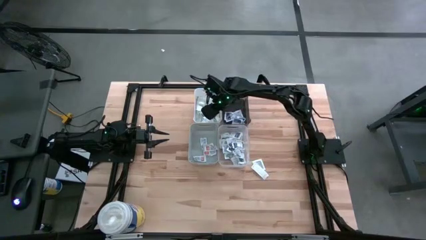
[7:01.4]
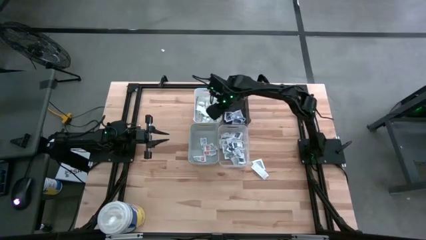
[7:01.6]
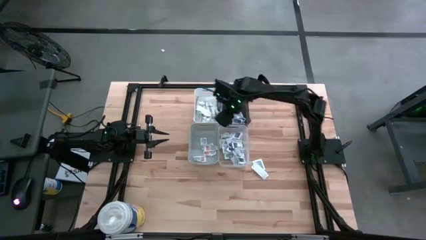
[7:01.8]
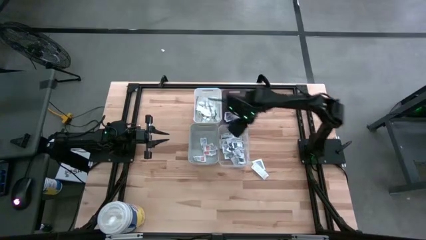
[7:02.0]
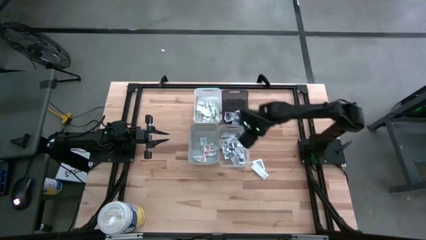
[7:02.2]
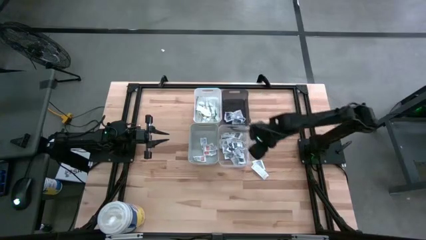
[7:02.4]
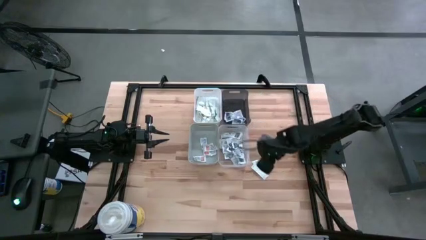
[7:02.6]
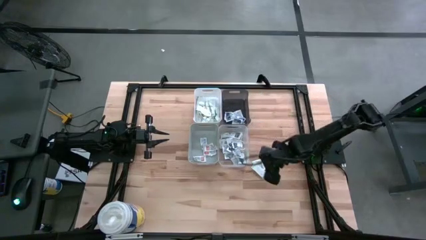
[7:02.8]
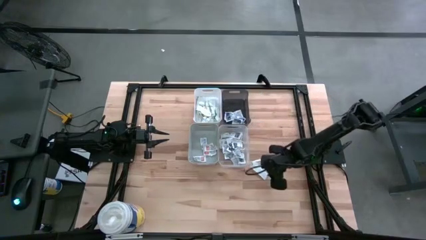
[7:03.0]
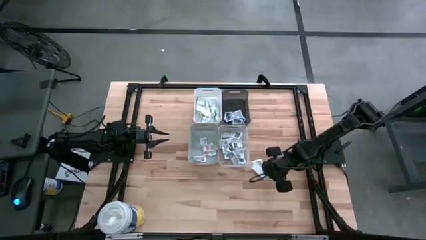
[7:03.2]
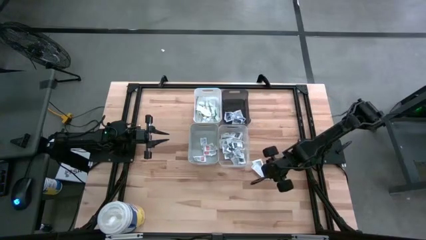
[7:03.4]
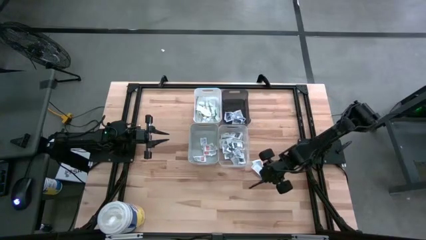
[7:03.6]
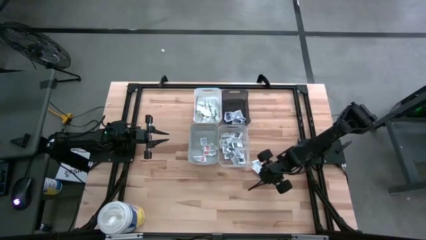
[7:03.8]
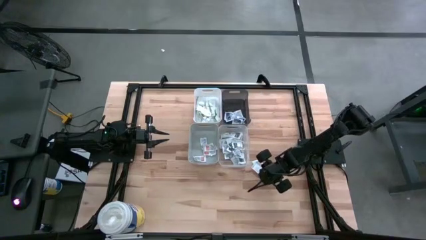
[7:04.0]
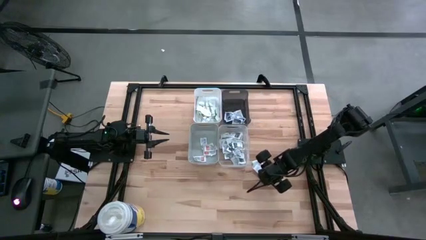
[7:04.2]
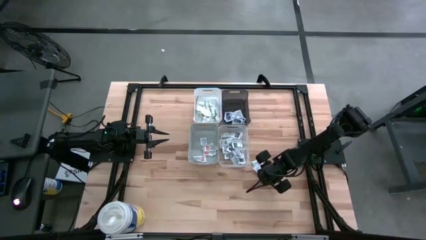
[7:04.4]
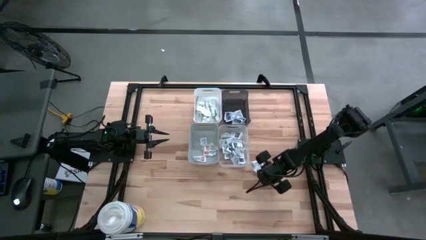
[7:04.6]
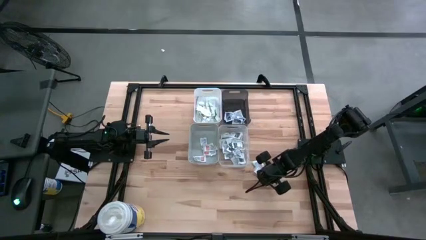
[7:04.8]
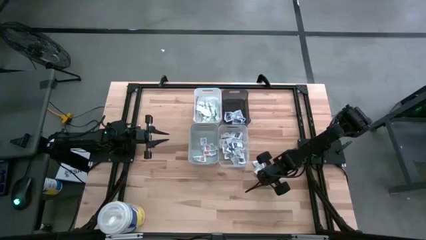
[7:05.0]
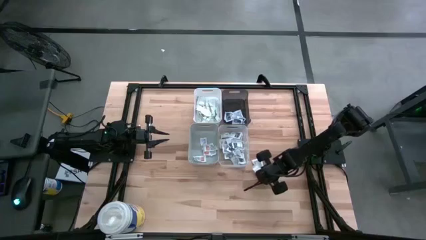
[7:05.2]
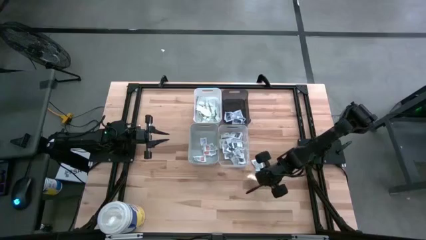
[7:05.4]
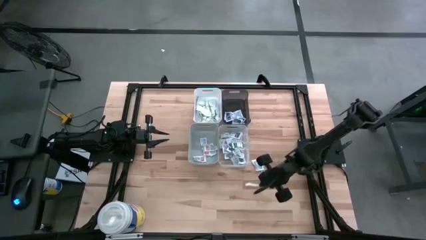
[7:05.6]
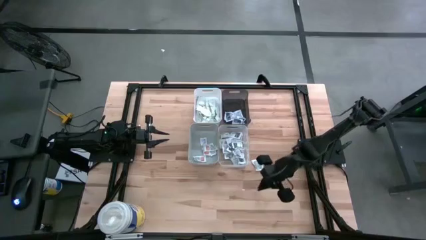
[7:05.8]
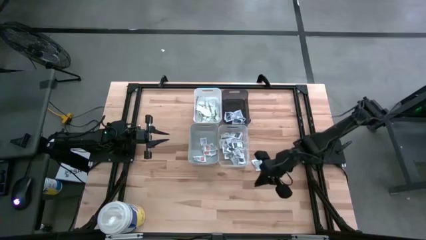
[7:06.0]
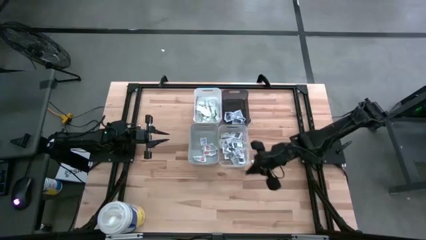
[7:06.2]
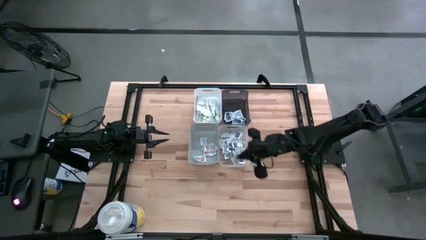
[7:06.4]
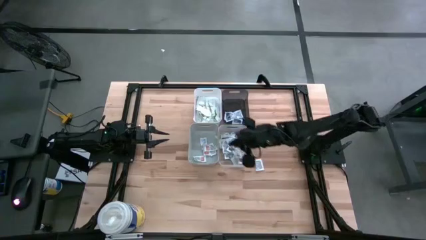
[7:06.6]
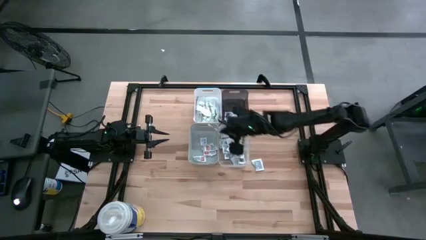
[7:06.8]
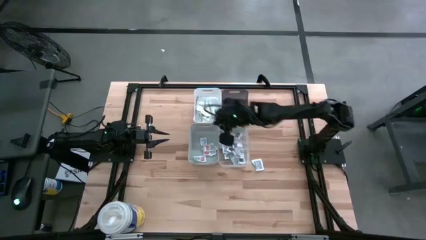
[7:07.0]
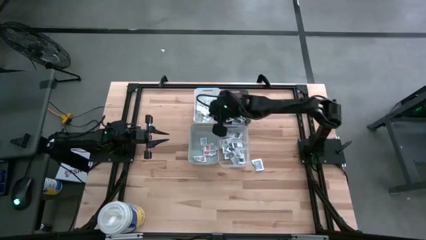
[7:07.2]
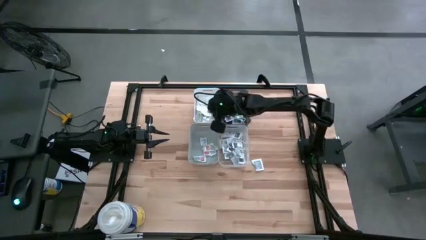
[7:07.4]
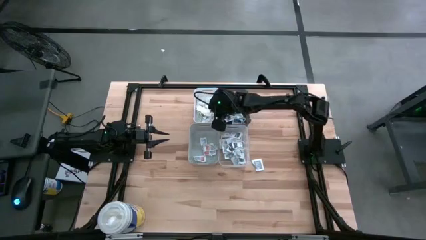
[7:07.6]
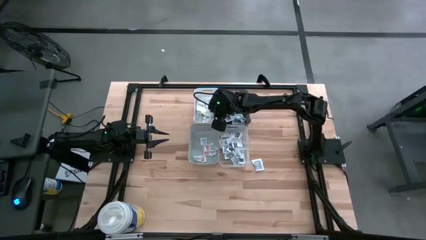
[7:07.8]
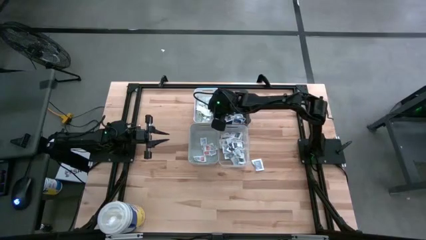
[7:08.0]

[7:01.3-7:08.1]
Task: Pick & Place First Aid Supplies
Put the green bandage pack into the white bin

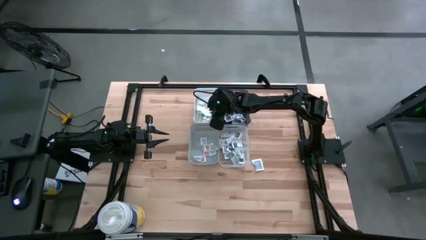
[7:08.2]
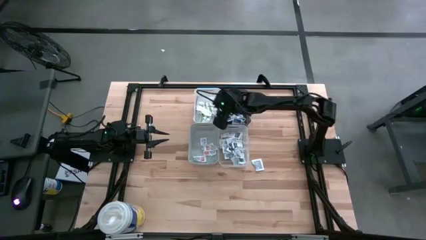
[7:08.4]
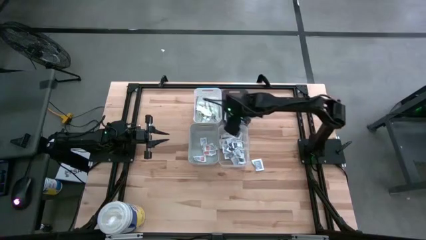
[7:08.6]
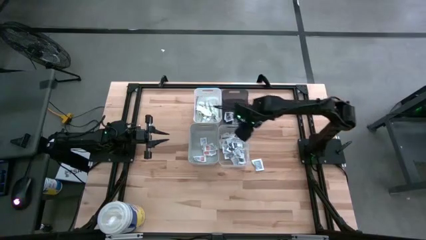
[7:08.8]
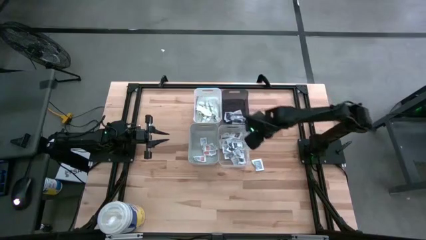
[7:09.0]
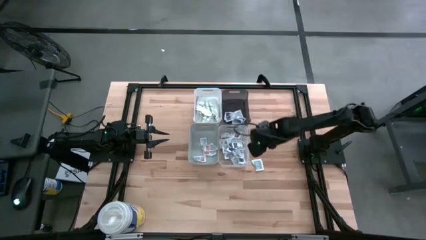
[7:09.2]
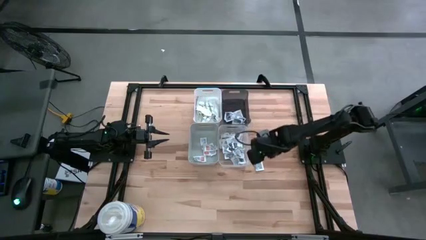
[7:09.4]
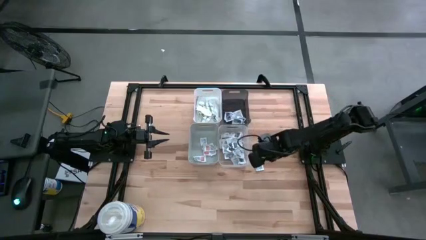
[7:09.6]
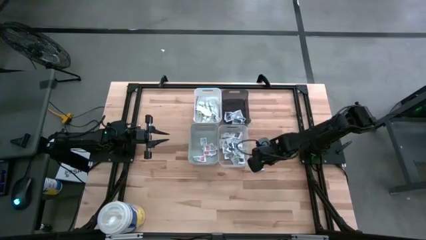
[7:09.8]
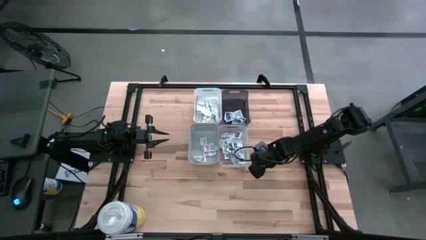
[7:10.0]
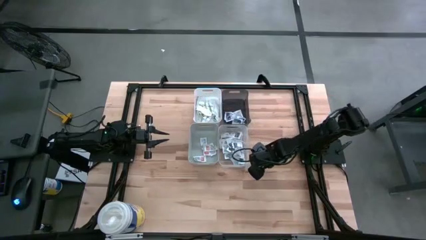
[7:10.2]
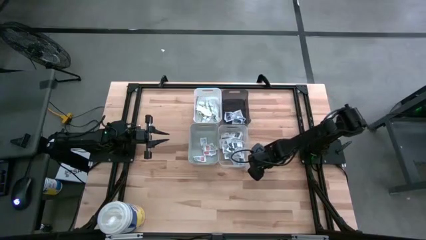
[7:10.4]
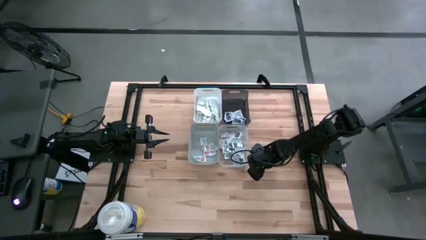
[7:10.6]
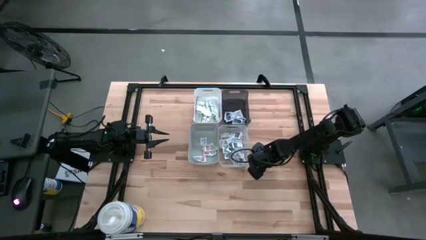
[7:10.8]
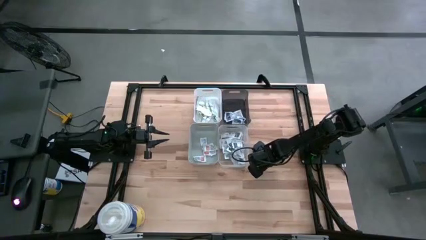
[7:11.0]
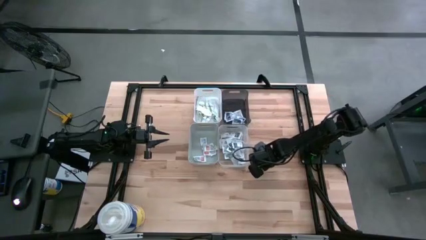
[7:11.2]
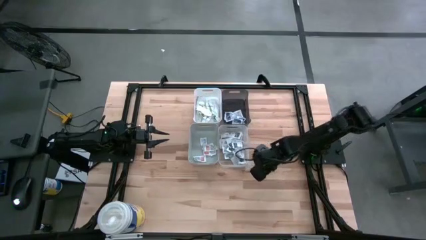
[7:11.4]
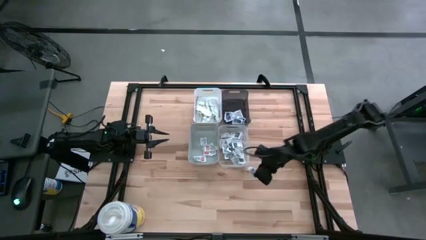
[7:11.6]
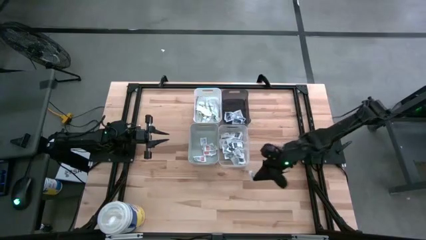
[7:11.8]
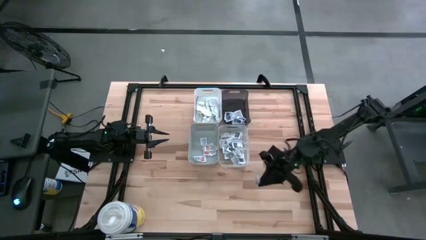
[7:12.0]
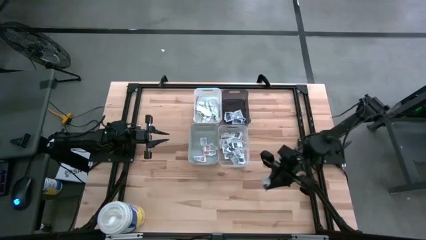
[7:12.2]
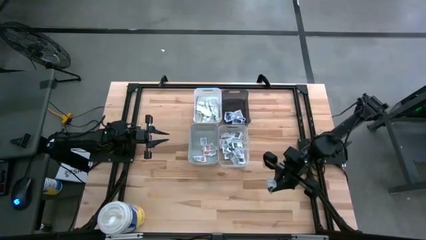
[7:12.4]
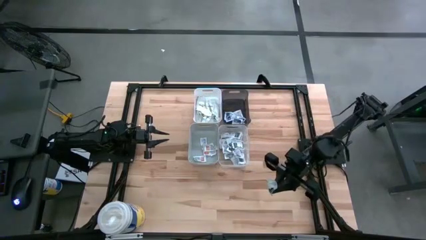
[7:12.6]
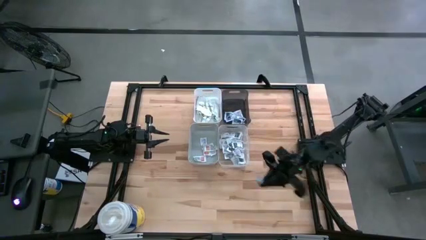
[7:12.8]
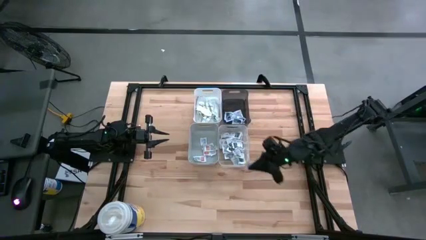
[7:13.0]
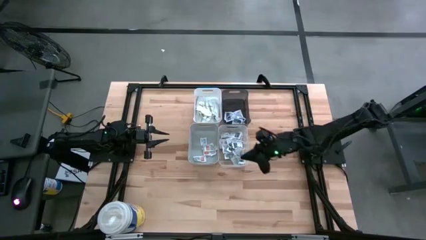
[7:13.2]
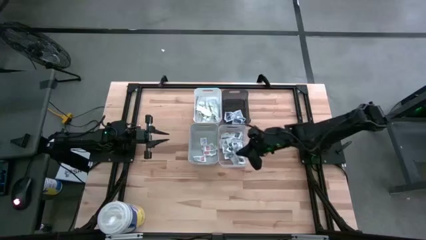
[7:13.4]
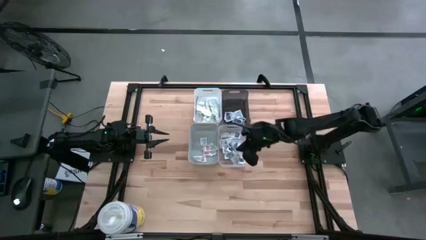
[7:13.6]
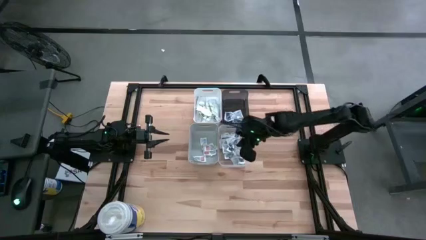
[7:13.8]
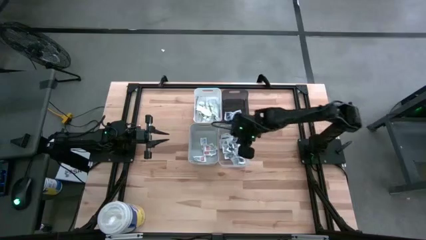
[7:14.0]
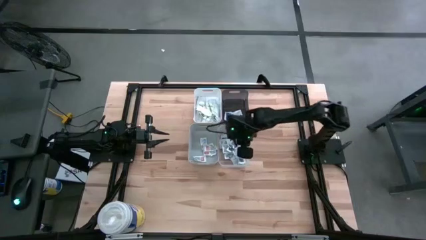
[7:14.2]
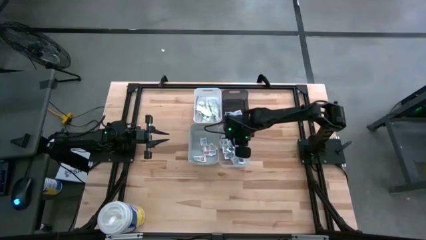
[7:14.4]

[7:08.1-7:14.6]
Put the gray towelette pack into the transparent bin

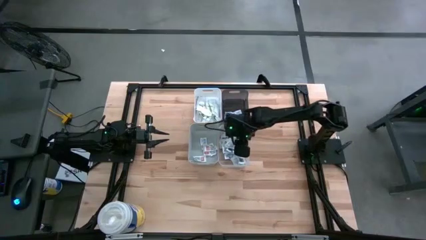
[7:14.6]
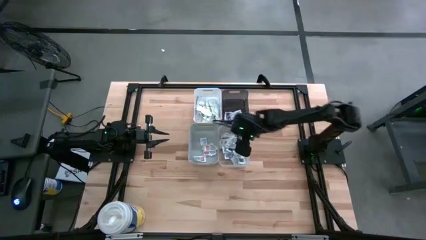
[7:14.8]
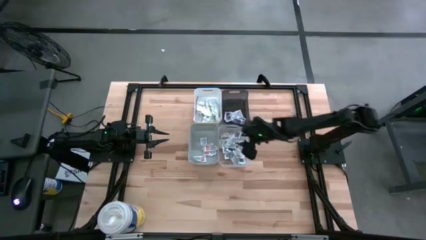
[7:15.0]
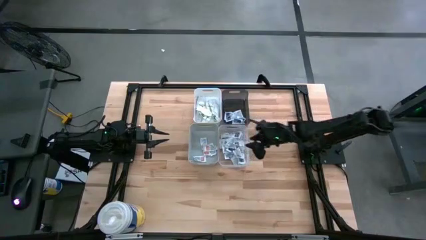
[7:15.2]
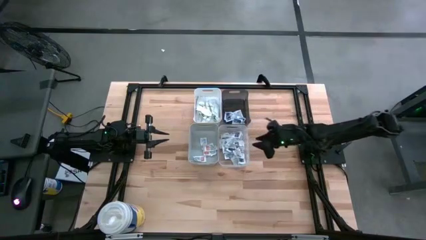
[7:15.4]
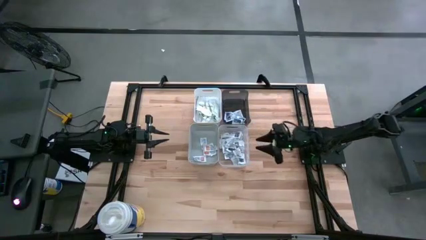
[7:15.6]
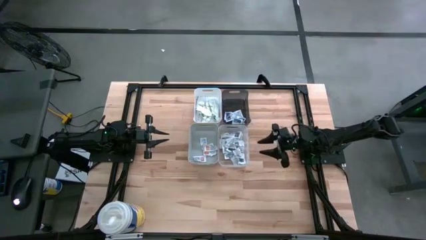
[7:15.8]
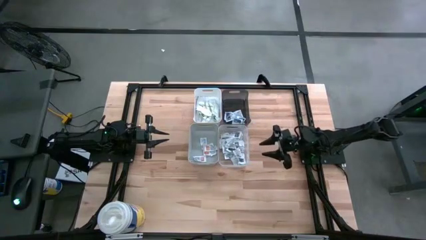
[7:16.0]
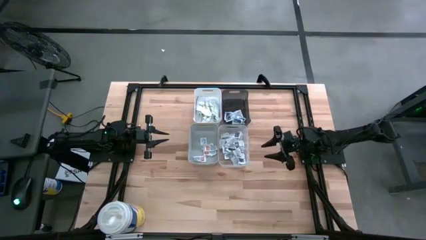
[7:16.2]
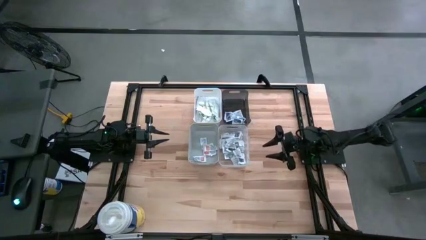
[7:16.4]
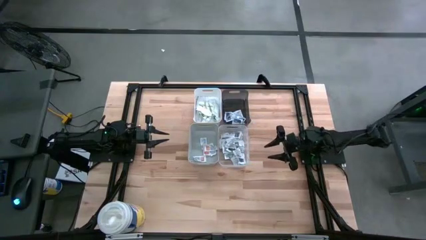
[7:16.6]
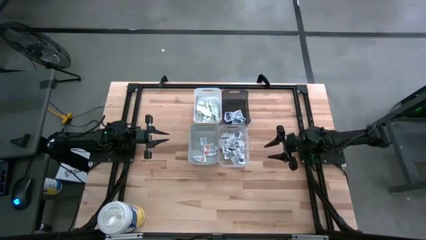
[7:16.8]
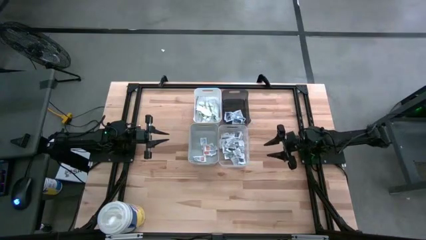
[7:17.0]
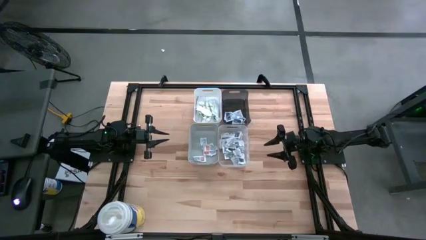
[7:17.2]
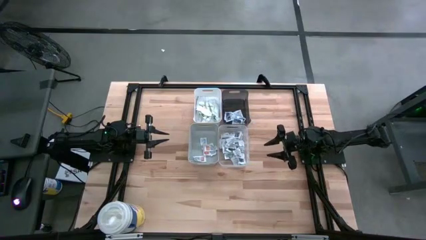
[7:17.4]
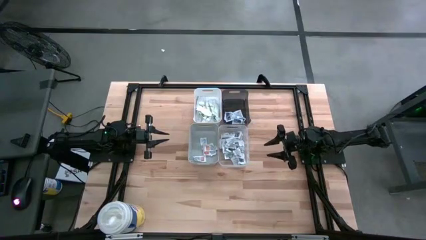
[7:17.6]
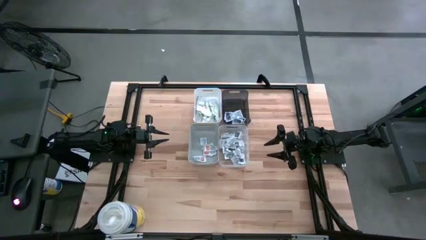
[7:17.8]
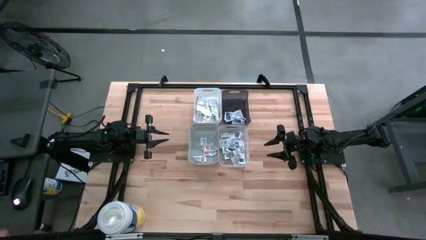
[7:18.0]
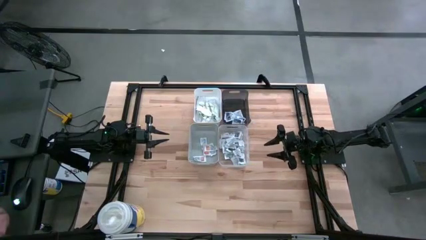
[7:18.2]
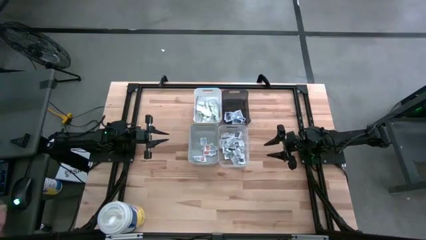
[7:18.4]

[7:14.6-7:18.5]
Return to Home Position
